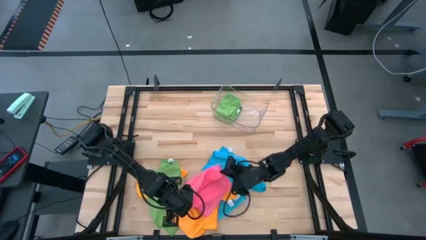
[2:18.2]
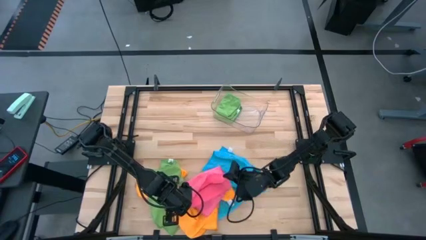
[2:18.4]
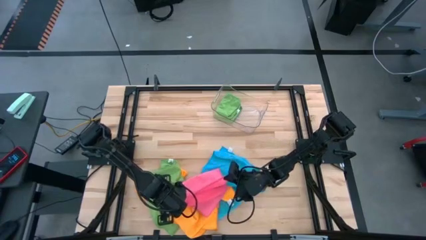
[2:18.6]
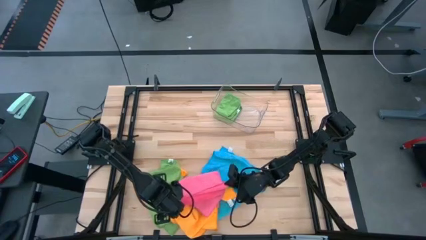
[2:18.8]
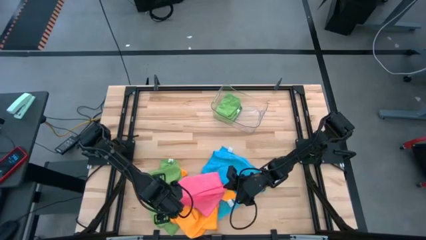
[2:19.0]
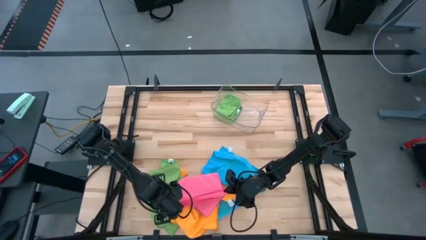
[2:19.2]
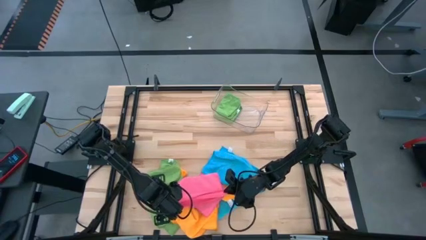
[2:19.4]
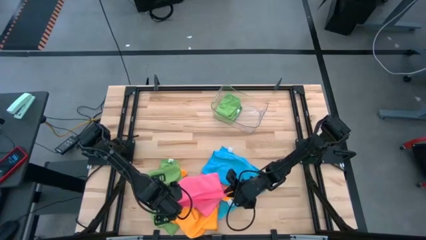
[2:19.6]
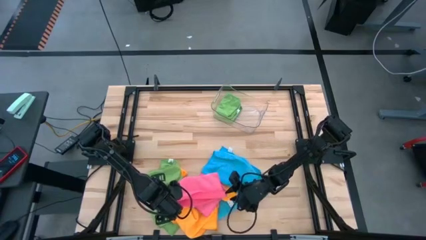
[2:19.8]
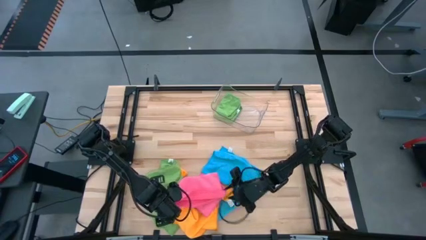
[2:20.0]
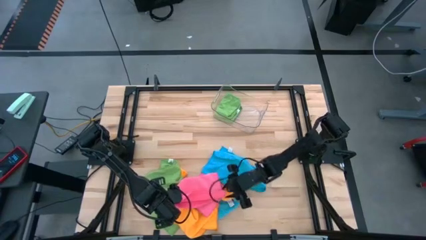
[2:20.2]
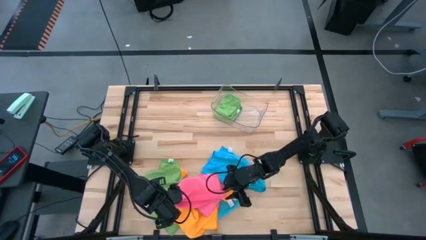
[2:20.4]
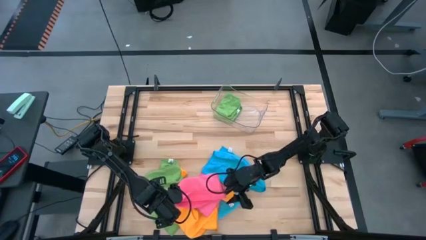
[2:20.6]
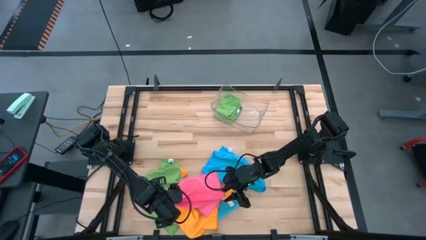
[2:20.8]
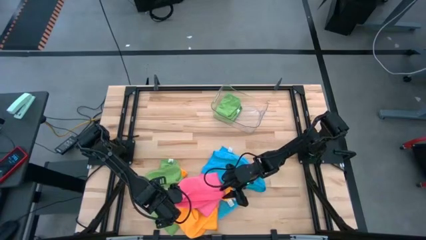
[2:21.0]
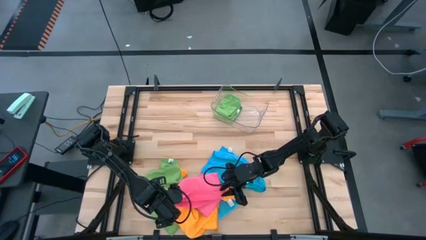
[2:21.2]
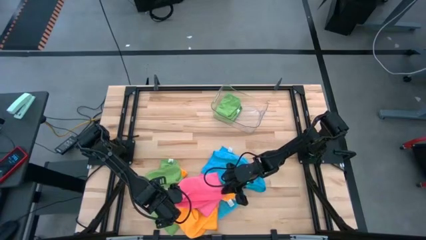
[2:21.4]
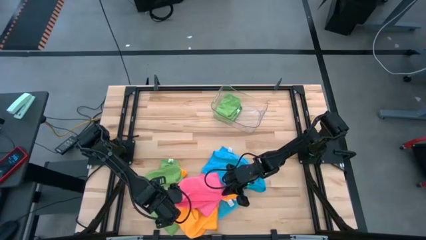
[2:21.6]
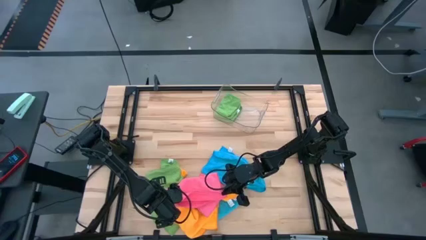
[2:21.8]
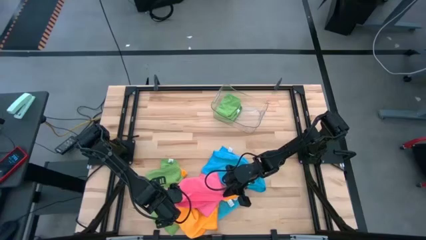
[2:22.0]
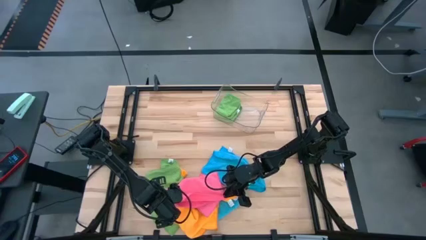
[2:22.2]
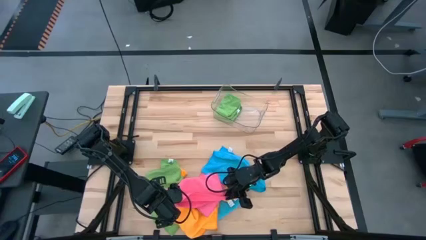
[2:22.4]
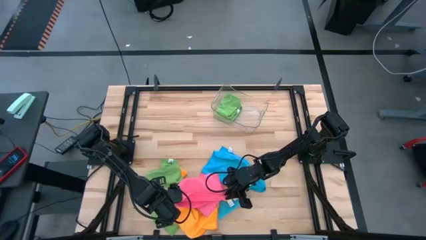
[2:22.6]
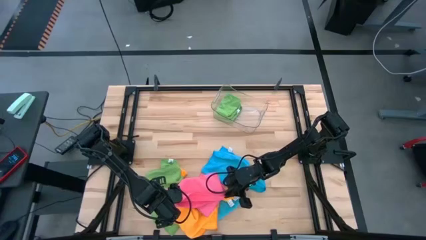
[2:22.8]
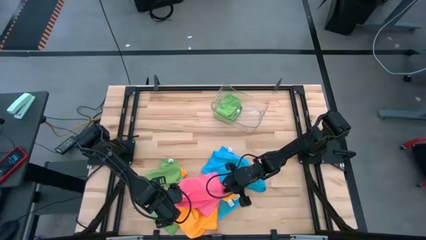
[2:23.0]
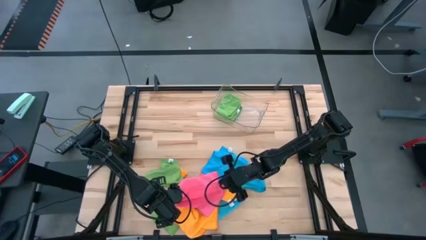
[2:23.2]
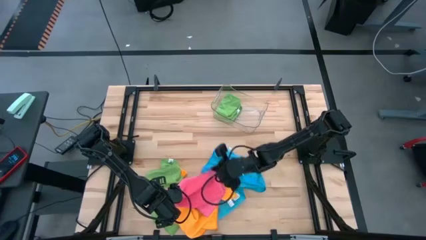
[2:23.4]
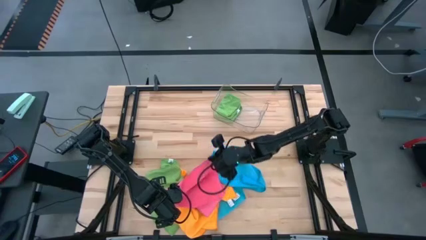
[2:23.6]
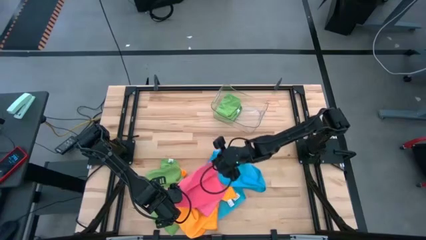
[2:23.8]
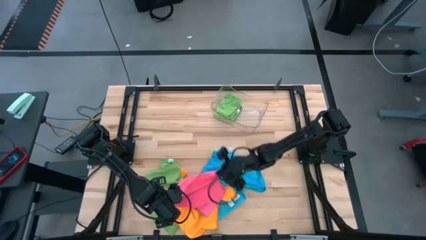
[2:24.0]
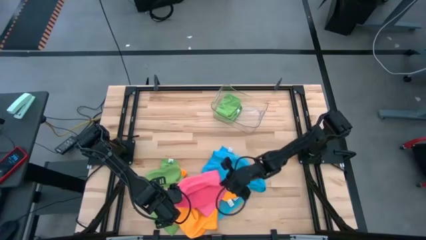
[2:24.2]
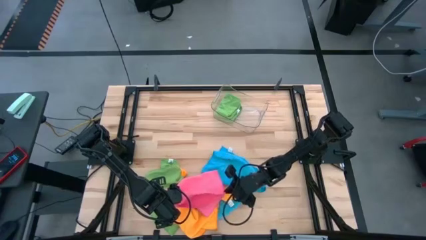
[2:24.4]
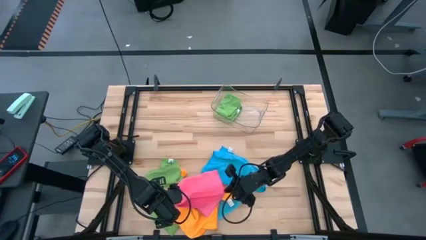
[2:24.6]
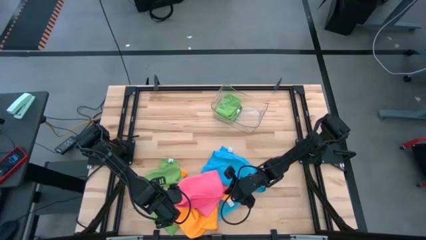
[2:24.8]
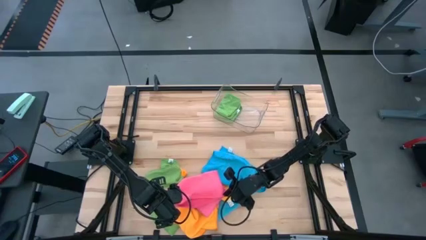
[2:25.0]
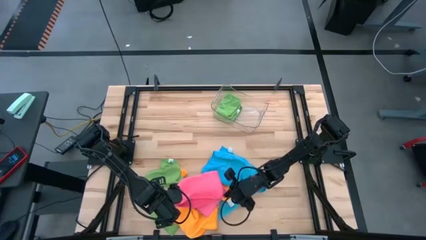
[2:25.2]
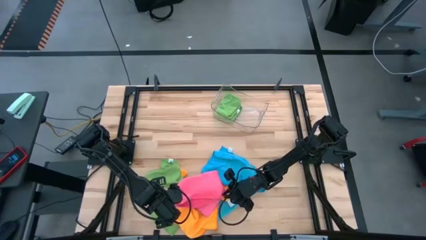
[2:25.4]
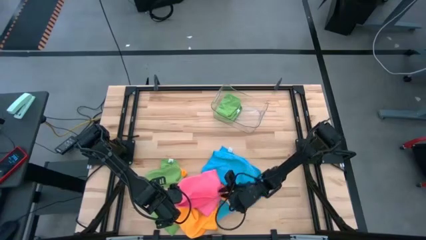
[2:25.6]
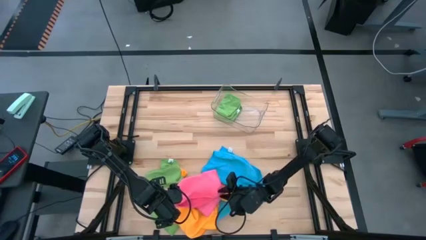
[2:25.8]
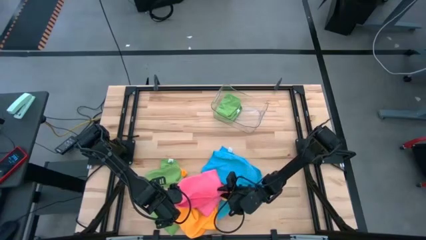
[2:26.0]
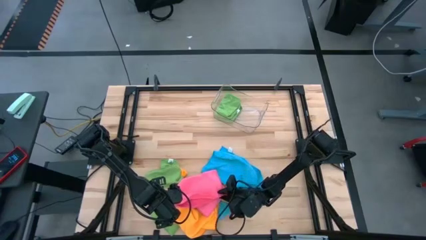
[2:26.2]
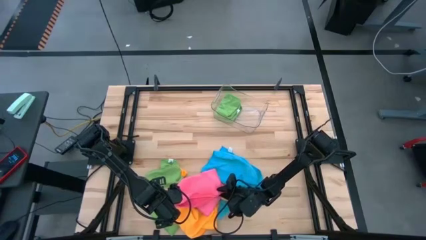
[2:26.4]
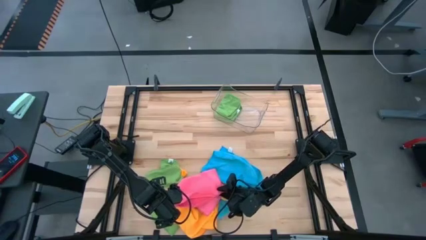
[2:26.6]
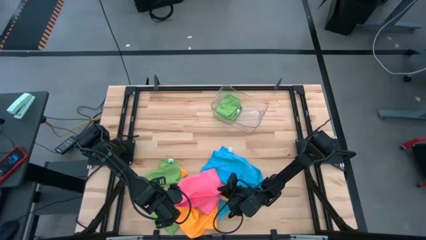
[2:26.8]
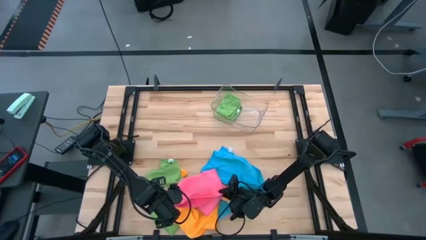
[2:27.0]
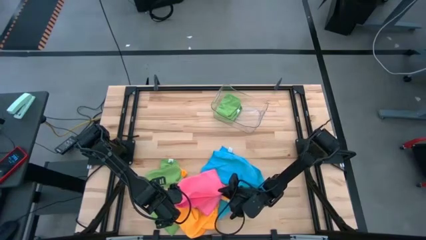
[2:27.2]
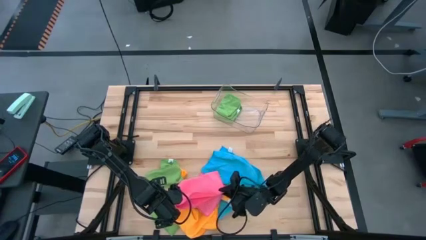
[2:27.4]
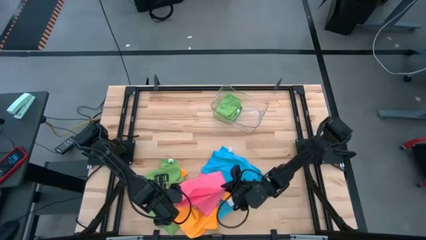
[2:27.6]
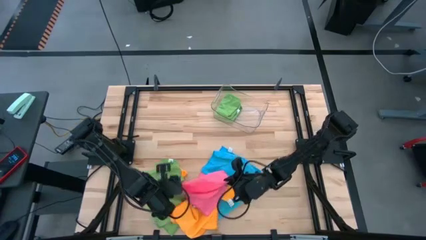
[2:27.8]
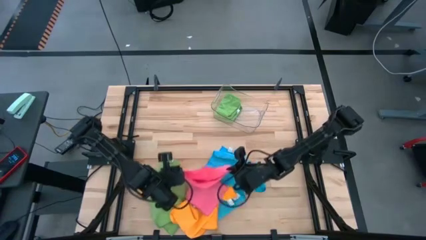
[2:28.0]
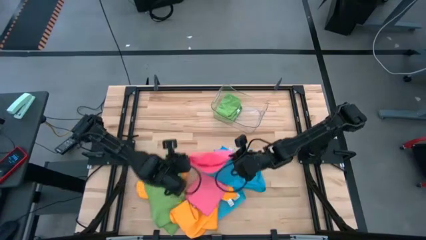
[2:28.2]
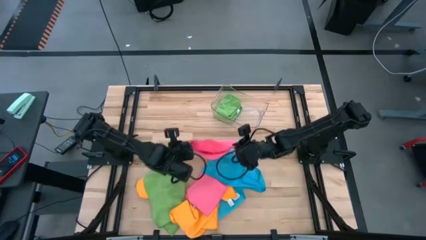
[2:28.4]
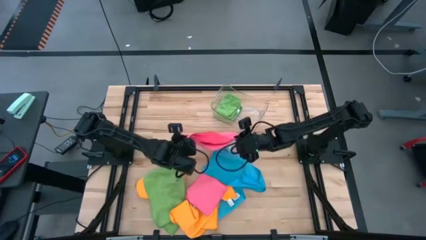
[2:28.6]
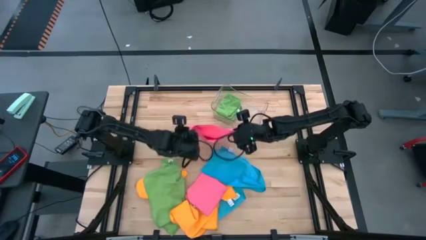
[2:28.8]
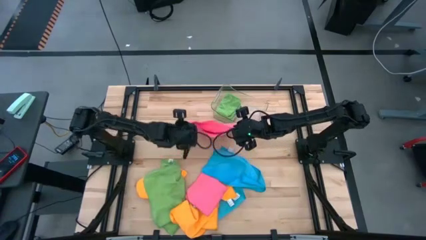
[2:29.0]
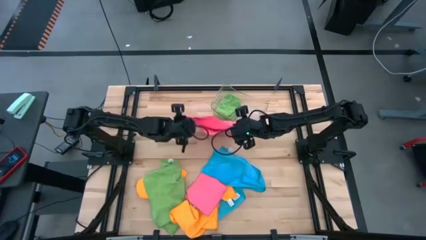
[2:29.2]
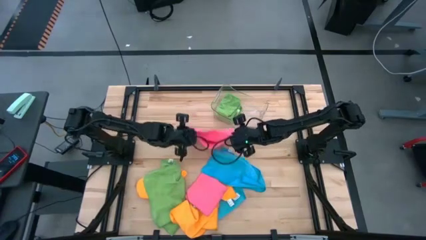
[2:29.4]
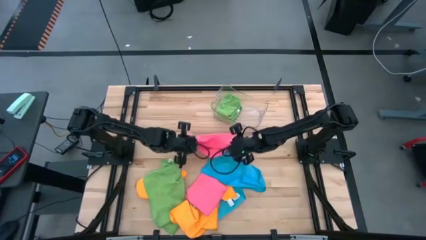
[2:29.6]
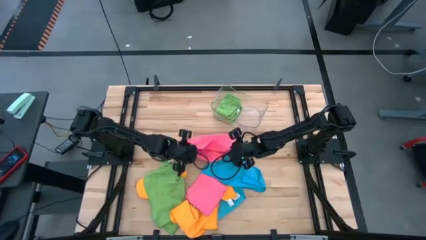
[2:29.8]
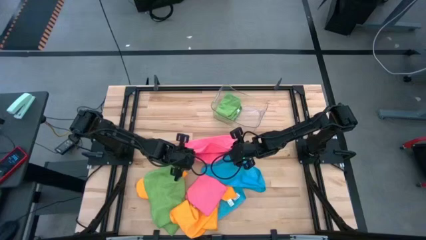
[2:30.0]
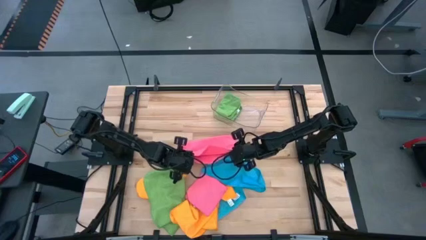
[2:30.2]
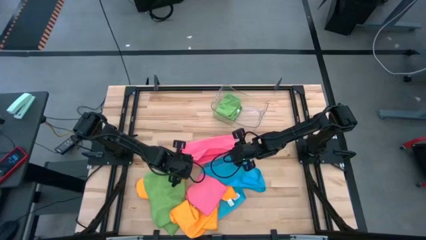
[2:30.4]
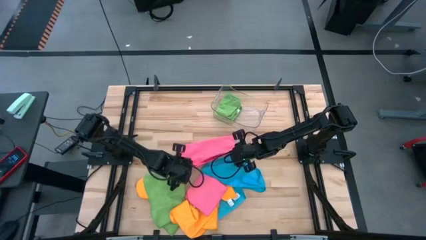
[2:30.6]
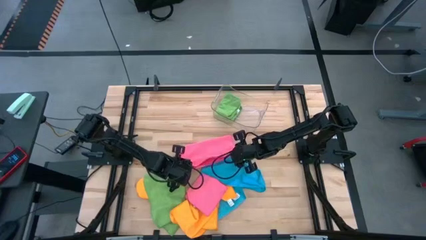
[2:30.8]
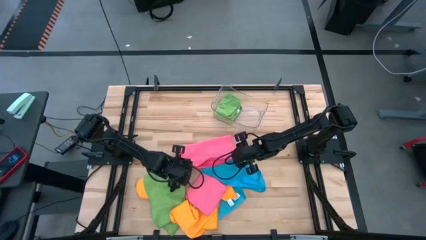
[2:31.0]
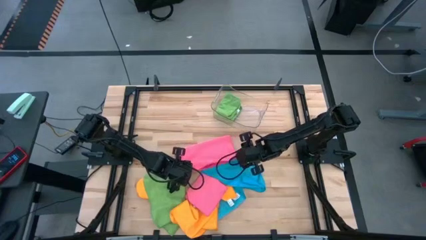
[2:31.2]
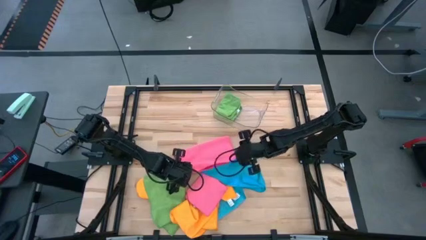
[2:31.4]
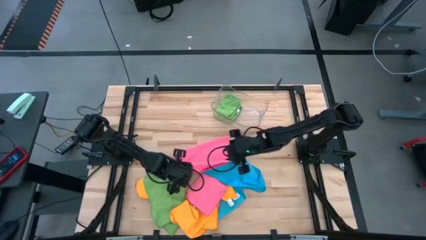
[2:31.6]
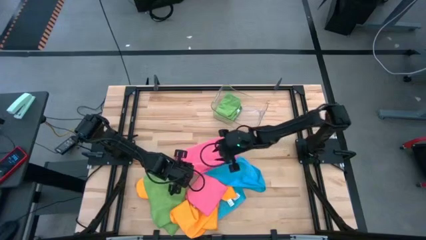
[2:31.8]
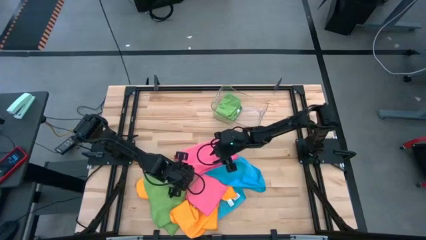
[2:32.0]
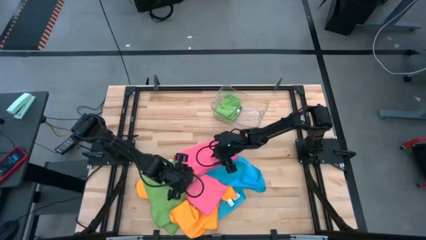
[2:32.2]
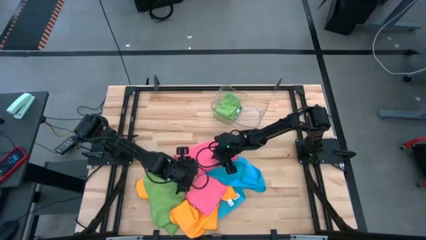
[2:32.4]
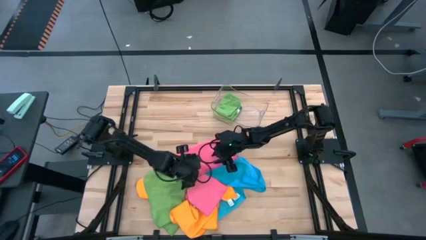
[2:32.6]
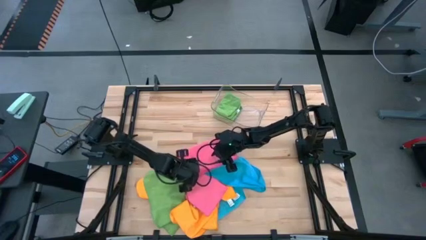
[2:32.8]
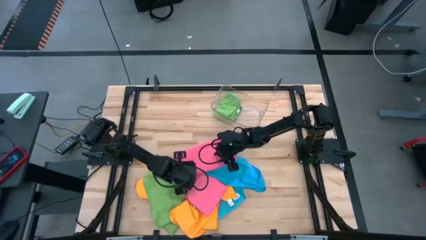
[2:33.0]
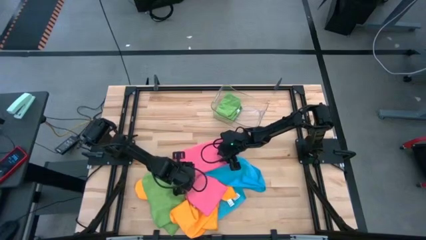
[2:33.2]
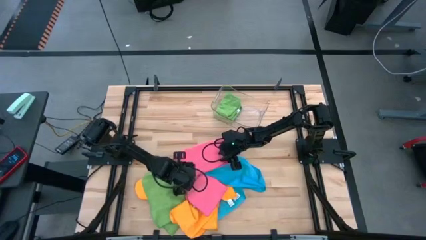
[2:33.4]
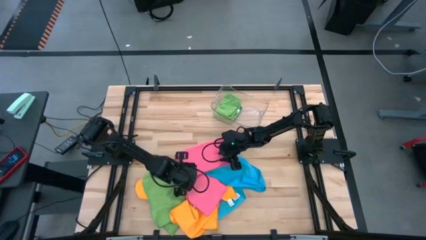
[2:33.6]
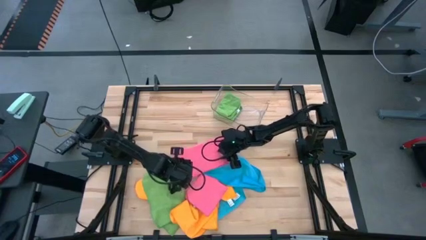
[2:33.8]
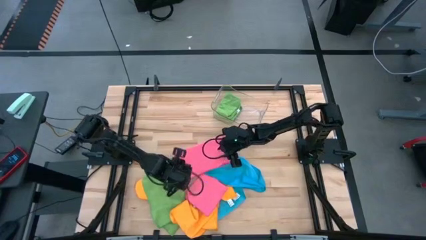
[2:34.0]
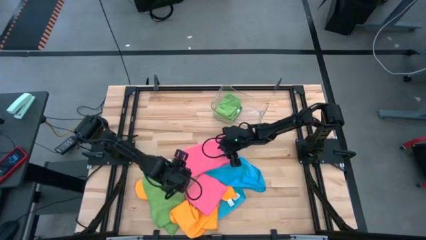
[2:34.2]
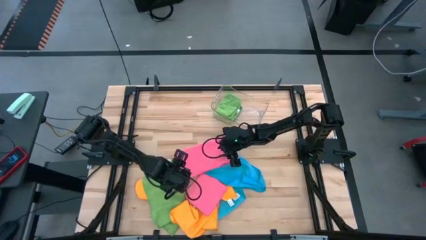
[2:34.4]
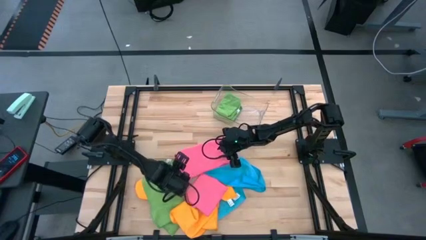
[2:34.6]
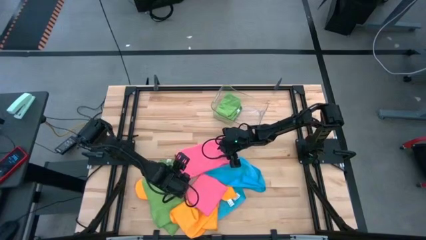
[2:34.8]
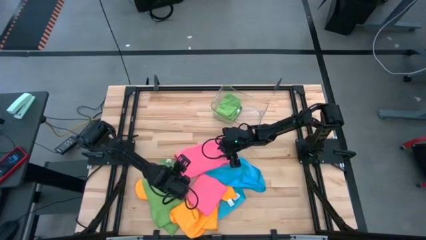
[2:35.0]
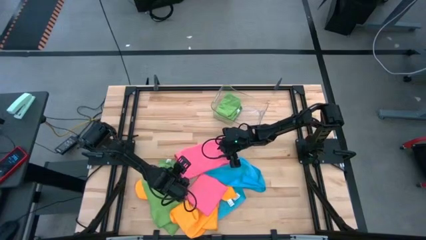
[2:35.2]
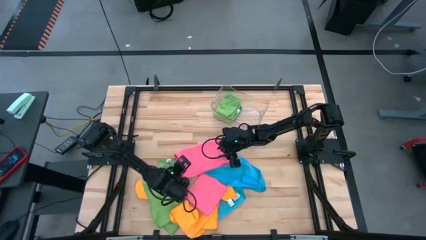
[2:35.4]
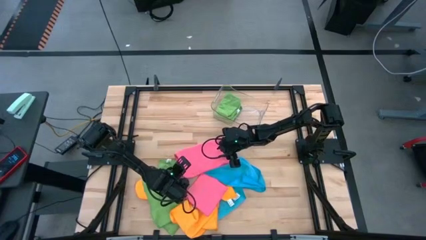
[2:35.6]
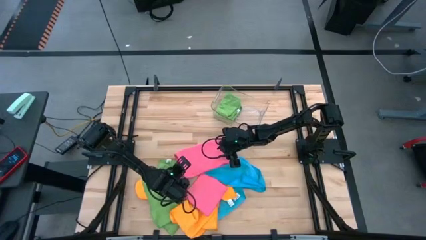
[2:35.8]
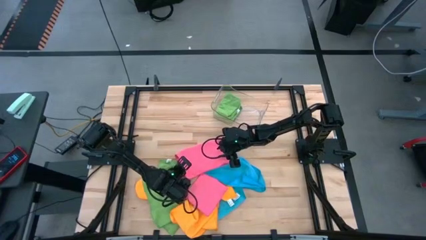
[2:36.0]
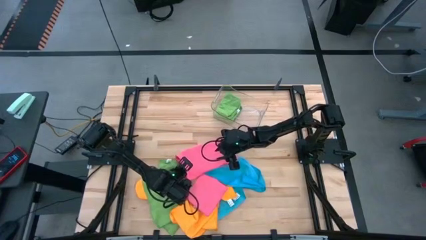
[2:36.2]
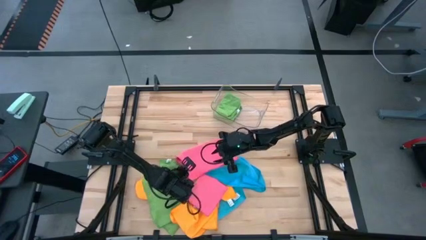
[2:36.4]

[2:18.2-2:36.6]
Task: Fold microfiber towels
Fold the top pink towel
